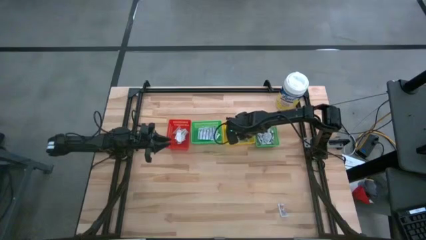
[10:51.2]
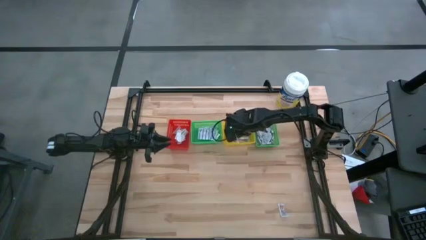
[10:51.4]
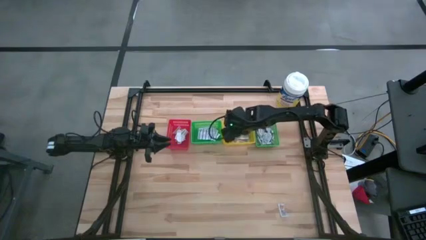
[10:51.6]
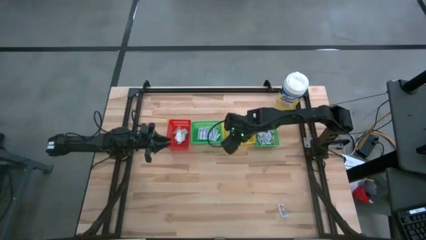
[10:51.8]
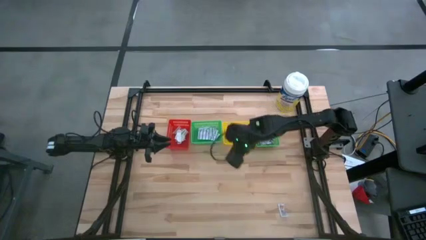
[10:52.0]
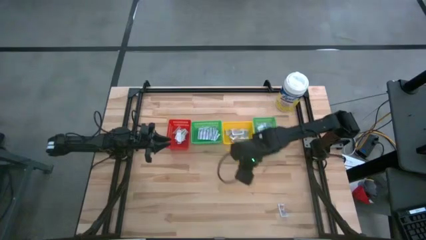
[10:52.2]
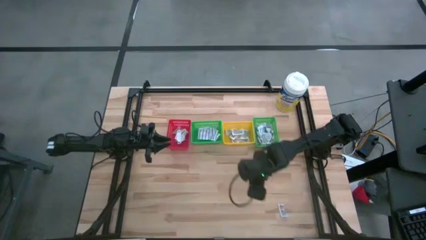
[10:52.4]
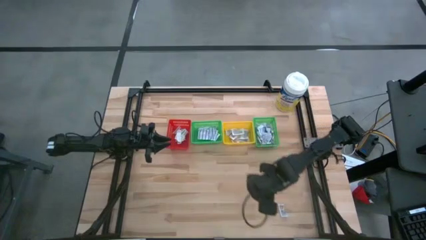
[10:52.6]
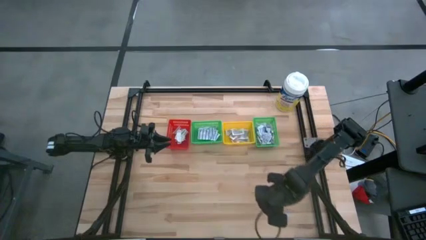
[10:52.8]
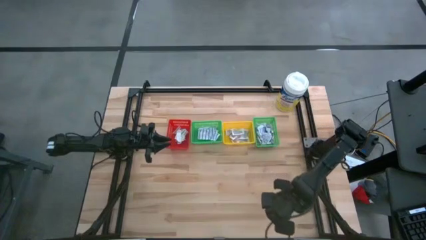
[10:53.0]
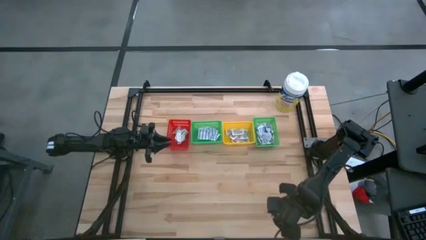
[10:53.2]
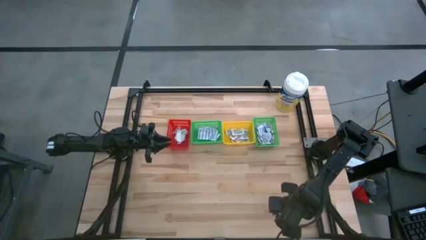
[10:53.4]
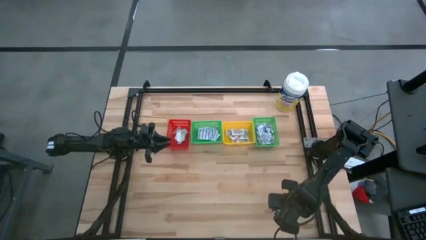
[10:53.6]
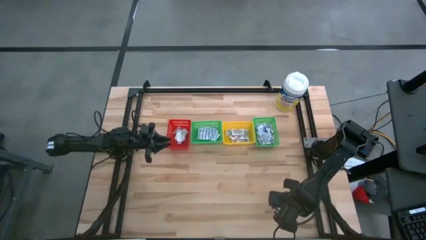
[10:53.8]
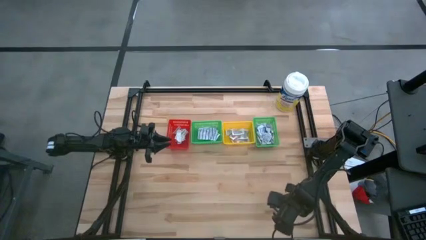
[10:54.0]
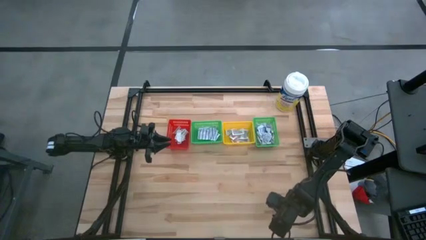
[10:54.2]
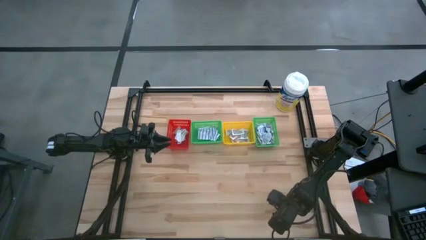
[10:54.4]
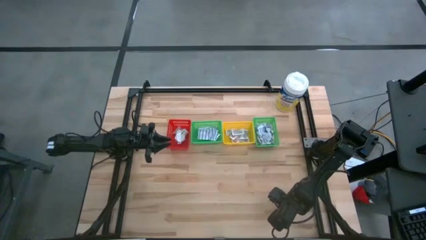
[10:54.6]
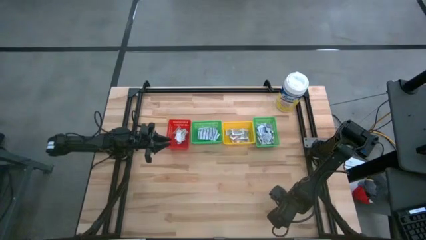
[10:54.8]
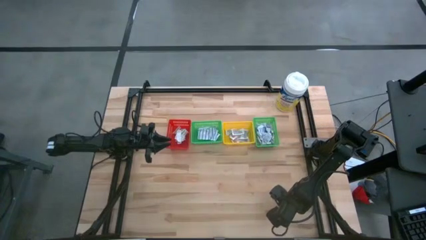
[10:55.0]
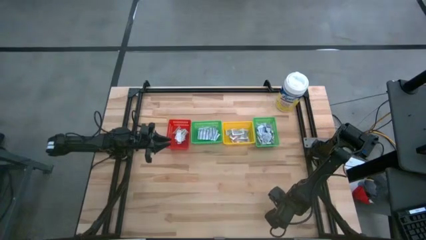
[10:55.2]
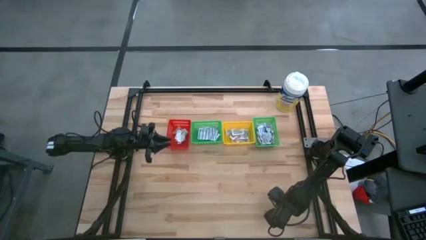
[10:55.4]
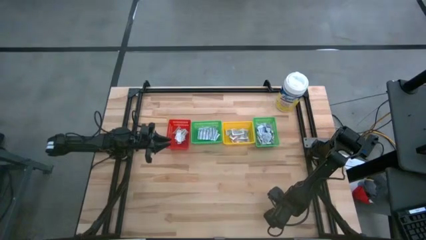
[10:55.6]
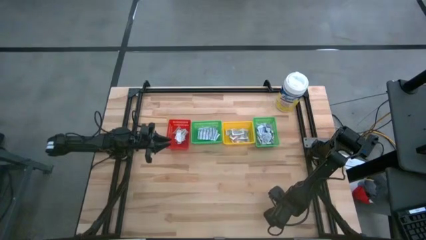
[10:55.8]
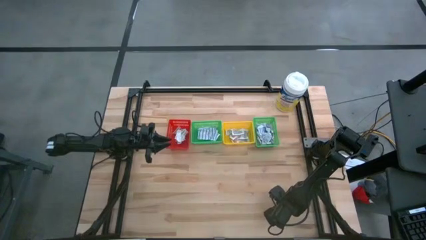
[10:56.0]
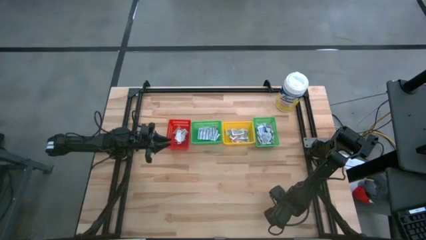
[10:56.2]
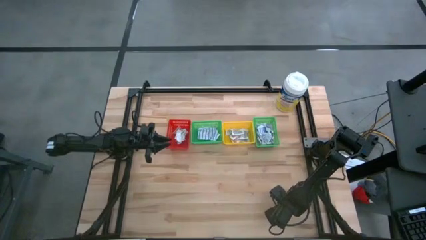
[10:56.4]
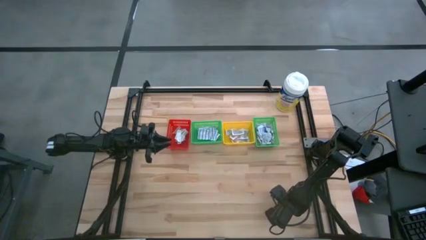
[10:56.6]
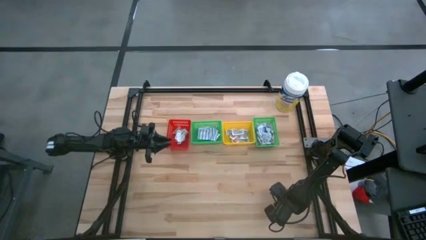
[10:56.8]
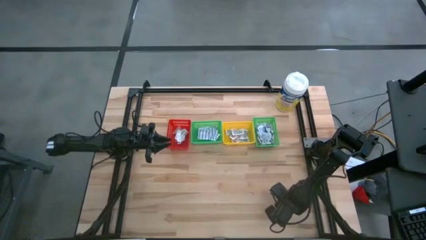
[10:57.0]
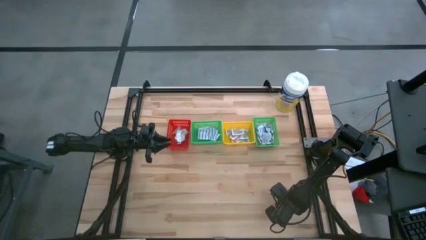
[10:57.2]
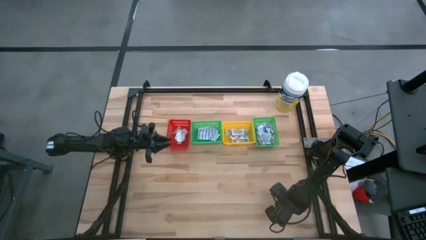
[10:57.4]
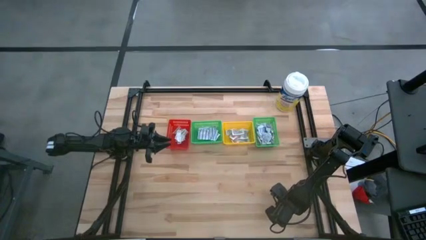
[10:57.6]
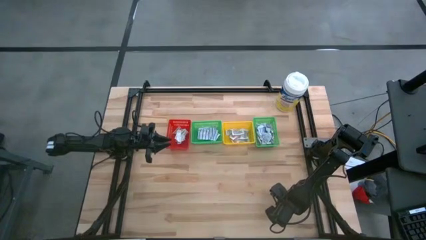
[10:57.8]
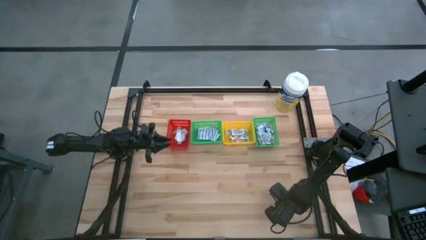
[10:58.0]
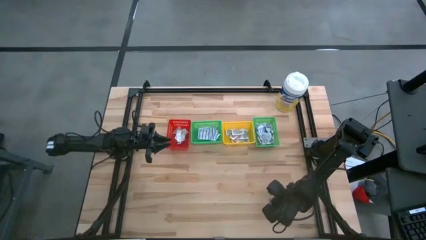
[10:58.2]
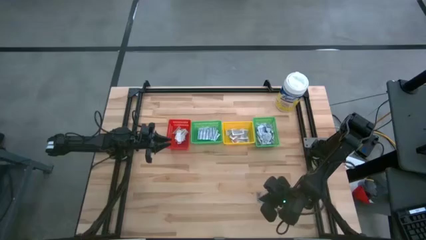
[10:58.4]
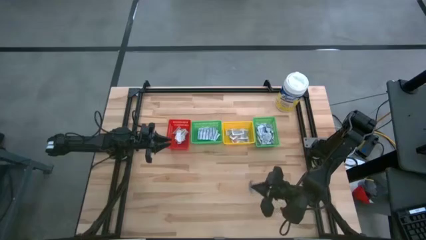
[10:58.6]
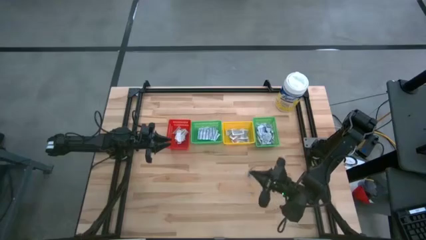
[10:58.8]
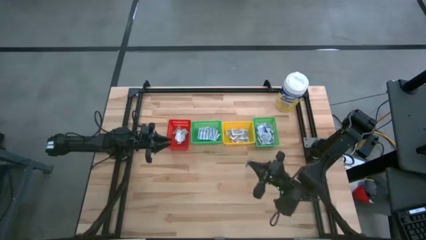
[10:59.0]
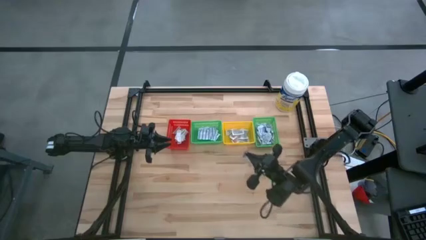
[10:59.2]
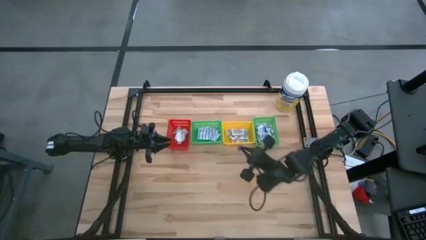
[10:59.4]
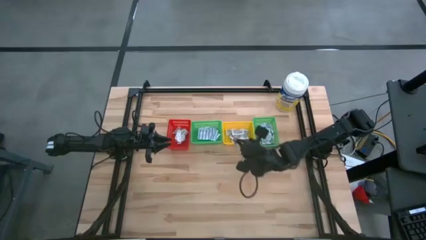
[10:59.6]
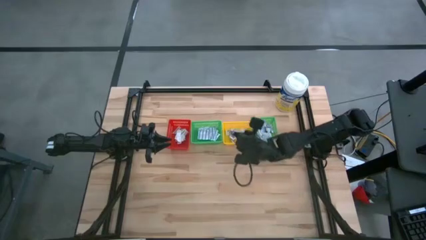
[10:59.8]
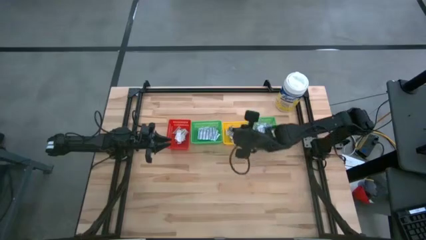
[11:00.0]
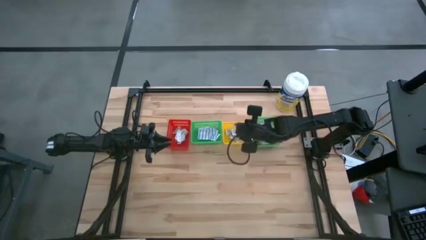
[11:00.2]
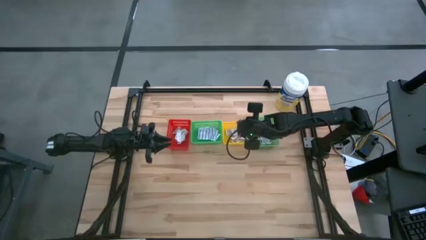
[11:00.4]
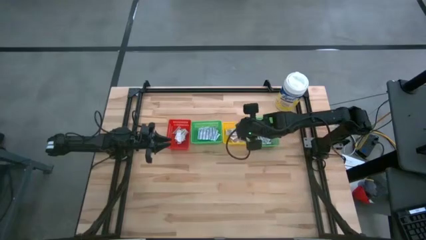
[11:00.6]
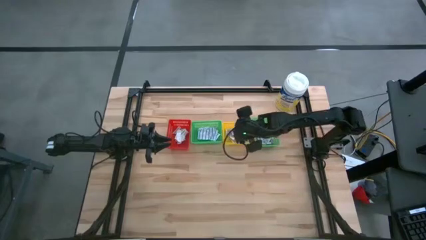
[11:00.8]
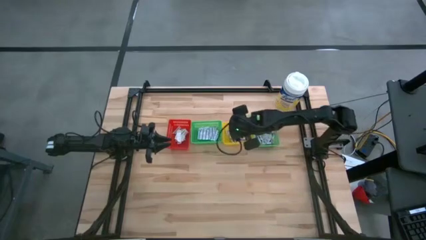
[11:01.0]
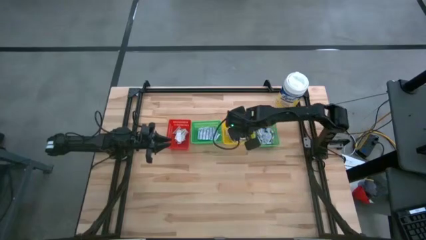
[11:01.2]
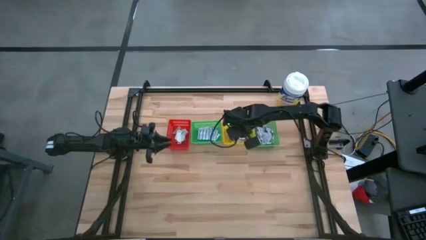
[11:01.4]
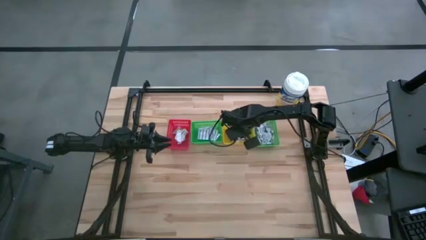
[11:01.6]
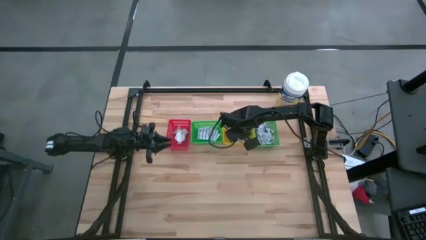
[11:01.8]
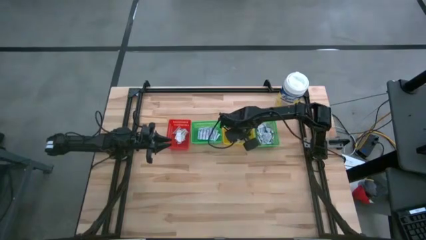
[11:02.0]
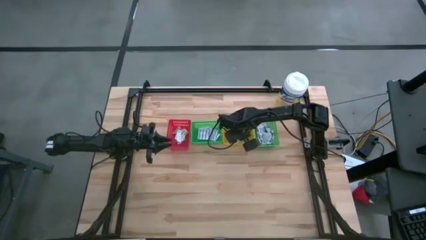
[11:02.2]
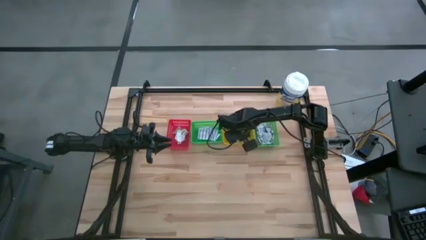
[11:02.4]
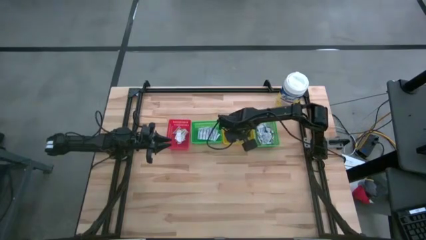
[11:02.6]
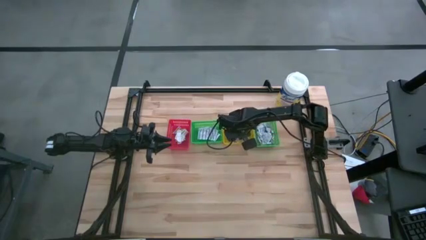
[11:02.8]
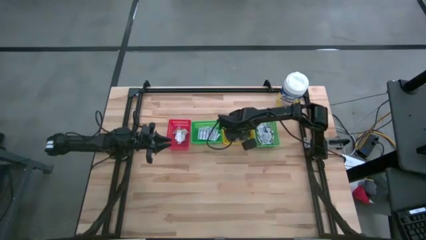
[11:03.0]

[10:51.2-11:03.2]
Task: Pick & Place First Aid Supplies
Put the orange ointment pack into the yellow bin
